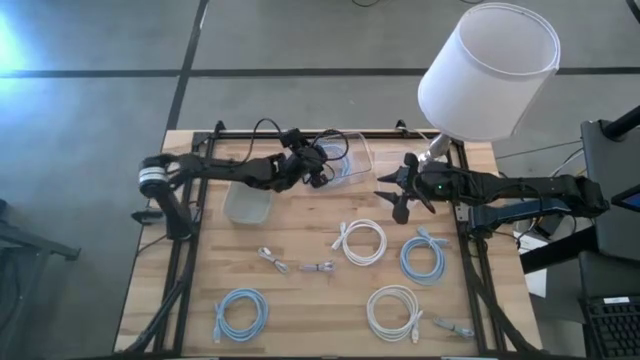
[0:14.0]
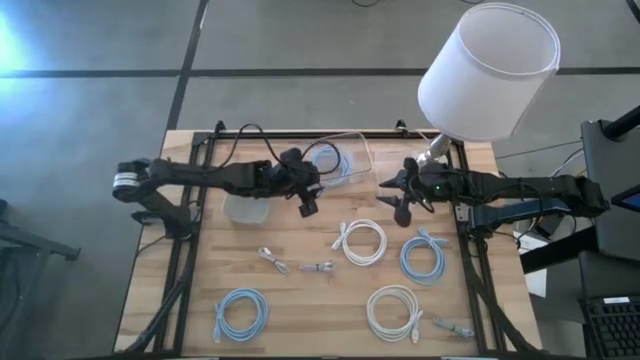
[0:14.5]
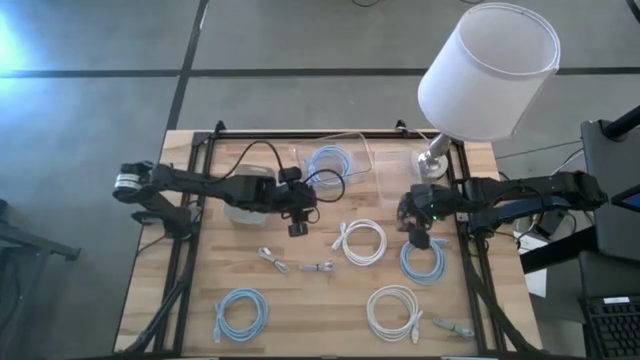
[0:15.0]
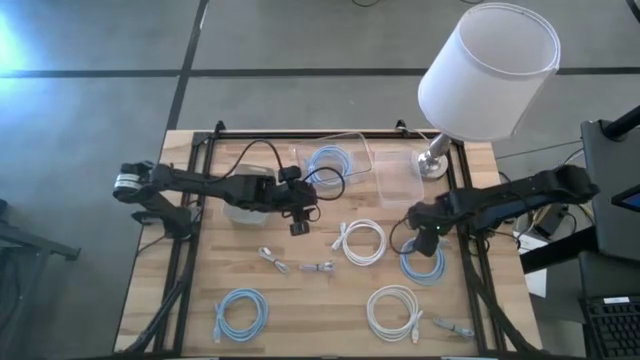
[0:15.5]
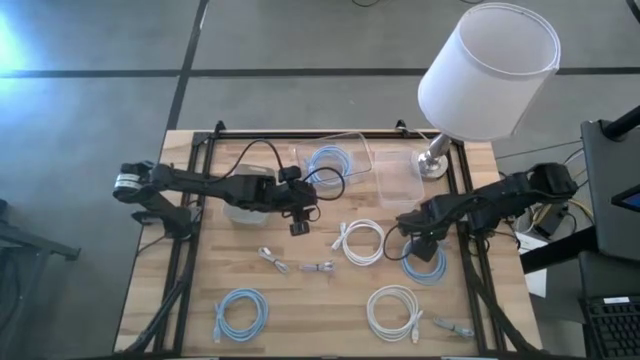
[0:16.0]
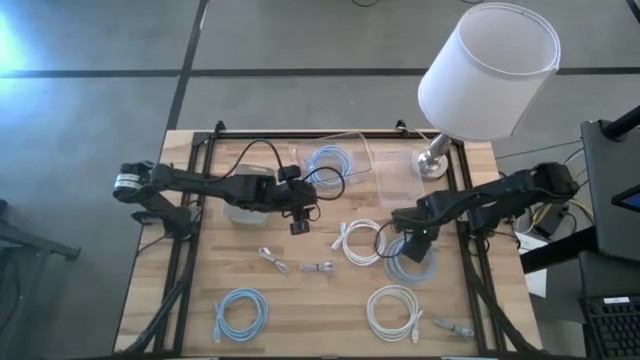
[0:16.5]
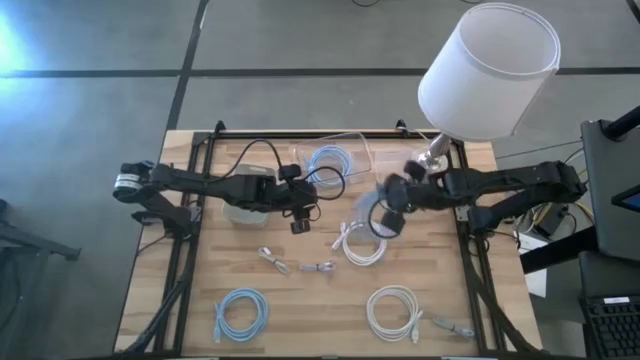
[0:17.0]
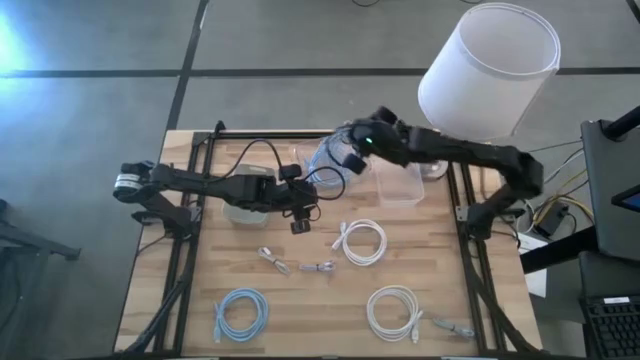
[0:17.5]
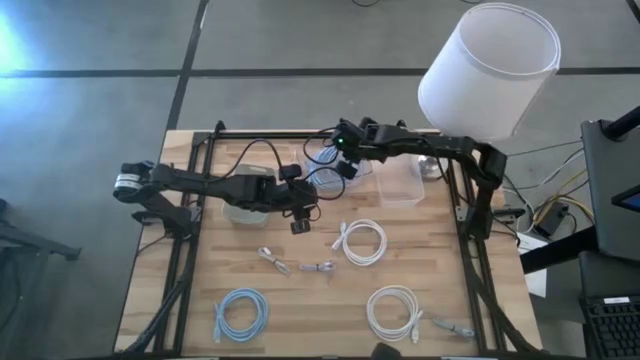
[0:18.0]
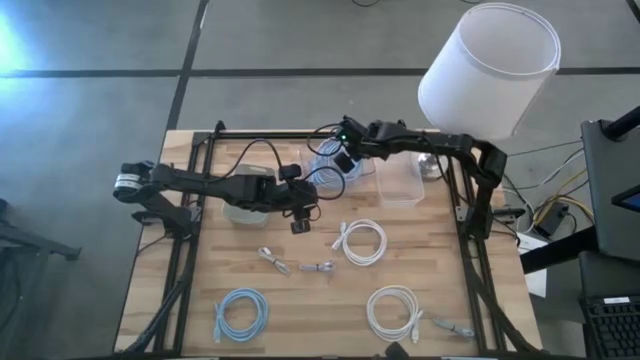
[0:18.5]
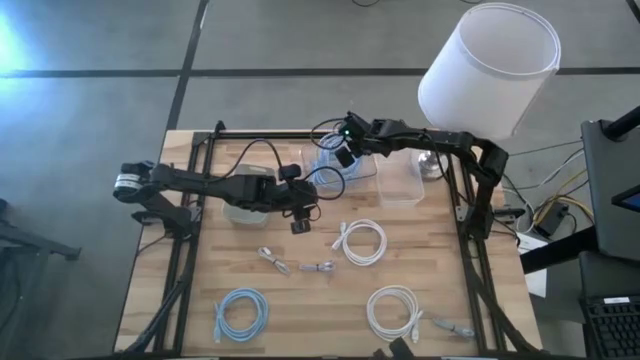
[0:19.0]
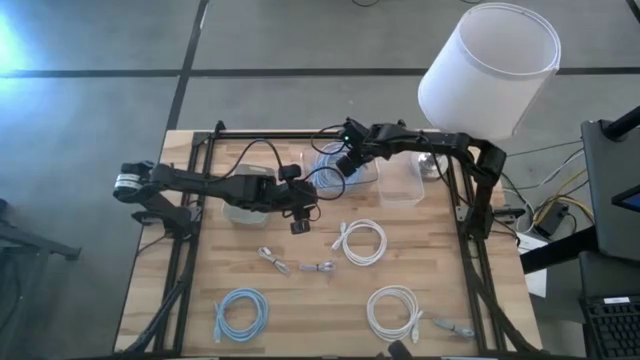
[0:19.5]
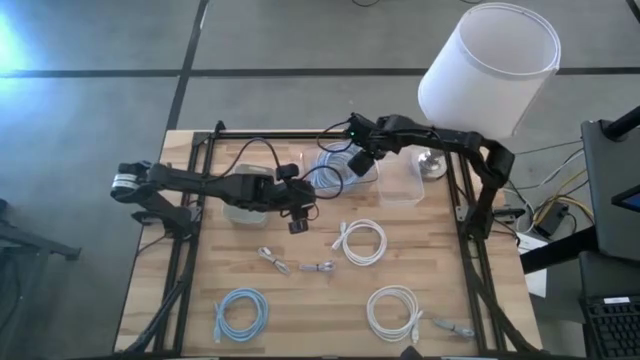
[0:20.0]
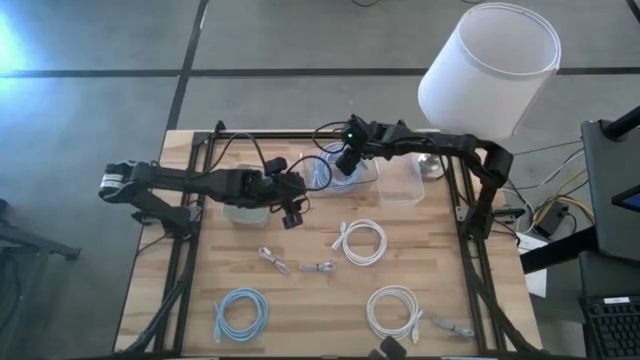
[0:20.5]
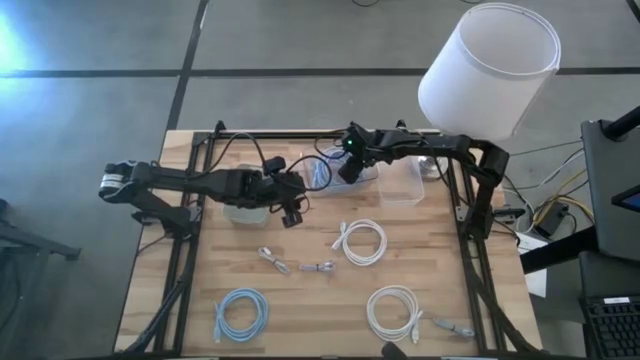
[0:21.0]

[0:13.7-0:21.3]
Task: Pick & Place USB Port
Put the right blue HDMI cable into the left transparent bin

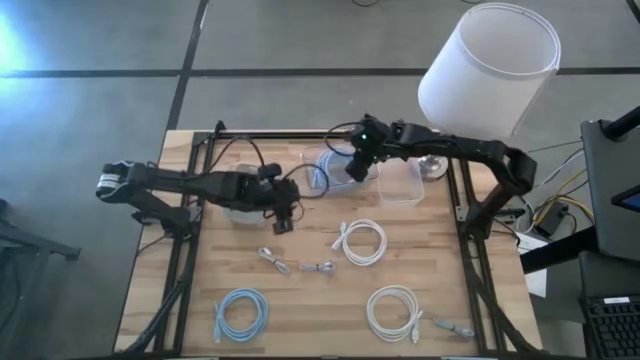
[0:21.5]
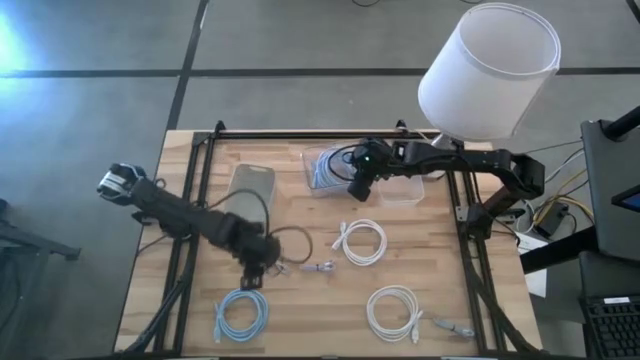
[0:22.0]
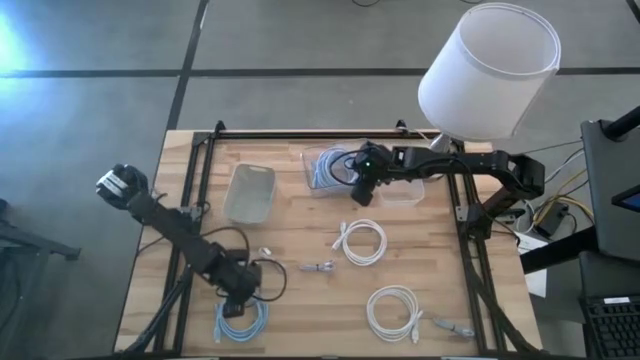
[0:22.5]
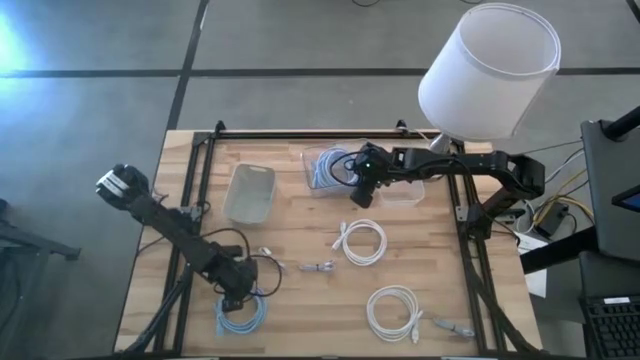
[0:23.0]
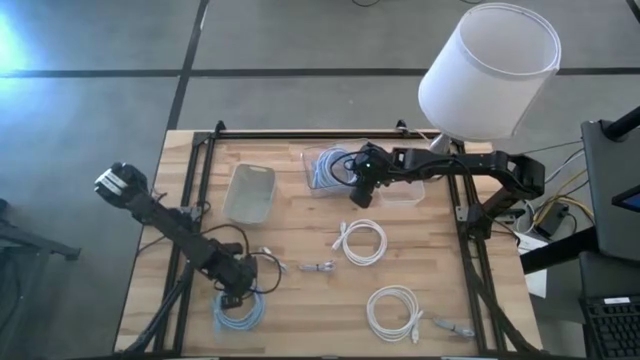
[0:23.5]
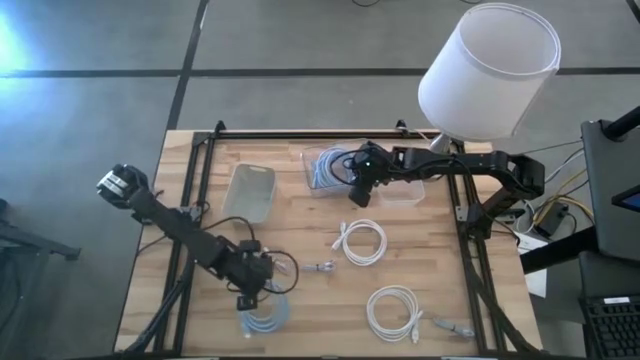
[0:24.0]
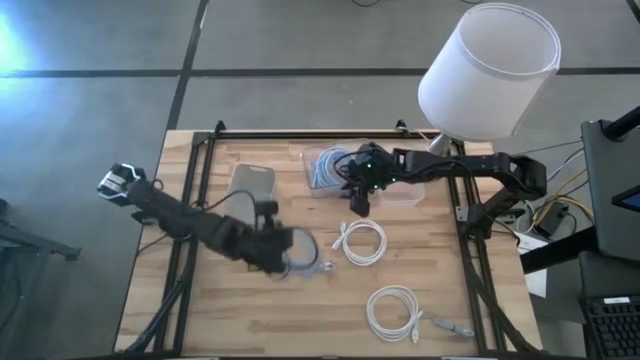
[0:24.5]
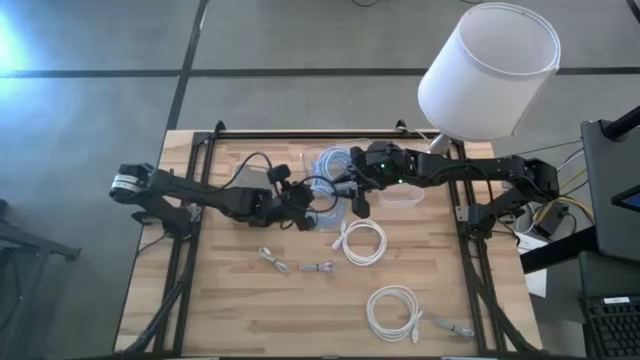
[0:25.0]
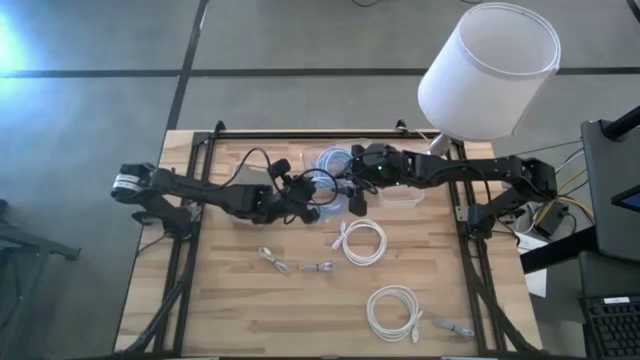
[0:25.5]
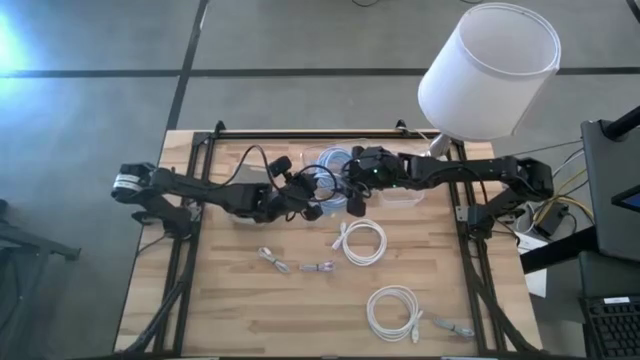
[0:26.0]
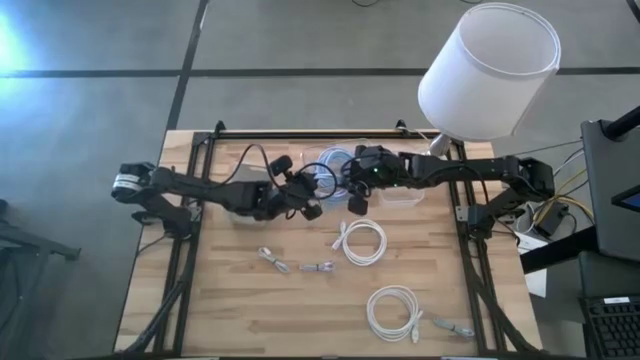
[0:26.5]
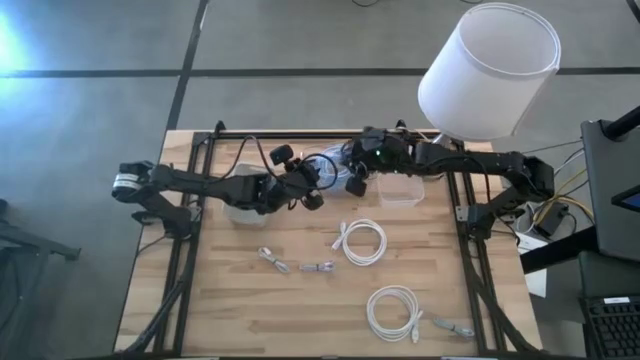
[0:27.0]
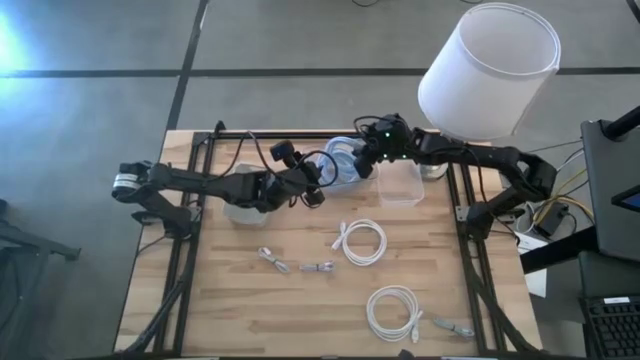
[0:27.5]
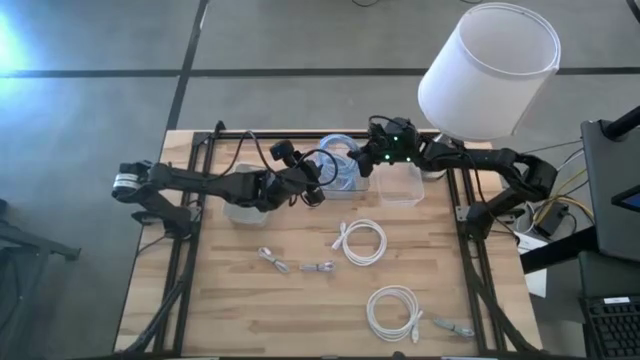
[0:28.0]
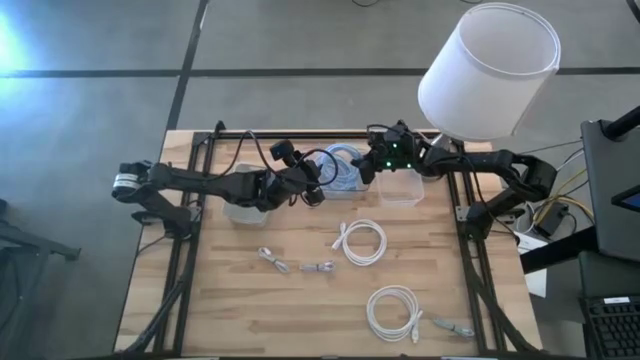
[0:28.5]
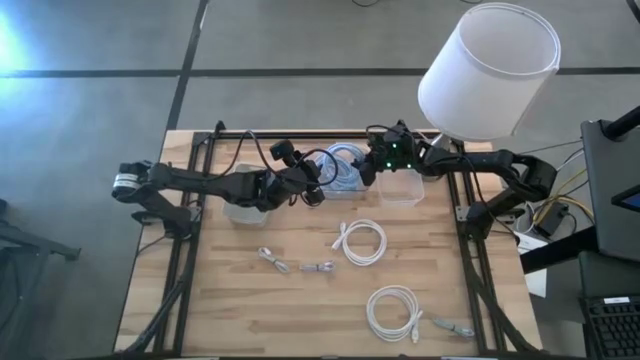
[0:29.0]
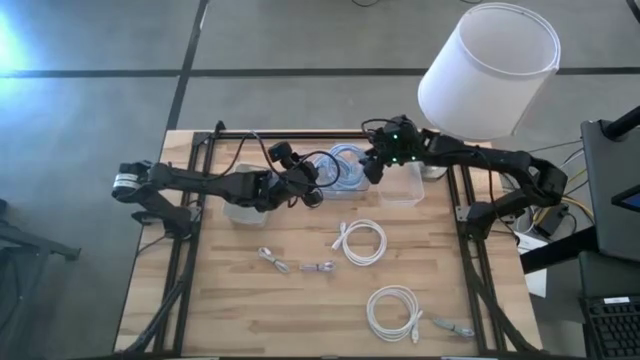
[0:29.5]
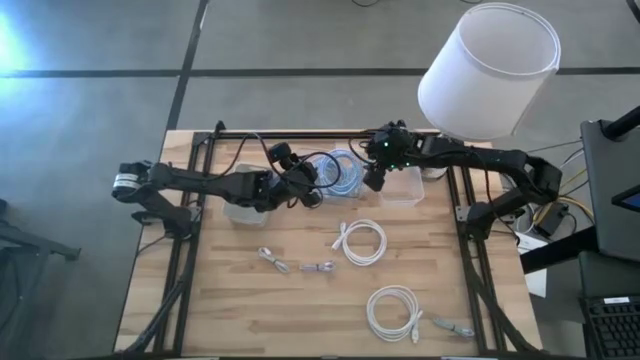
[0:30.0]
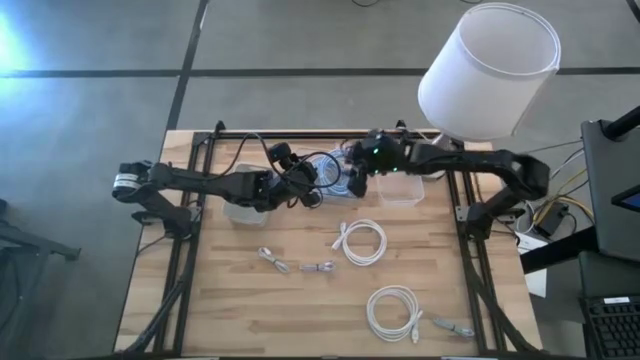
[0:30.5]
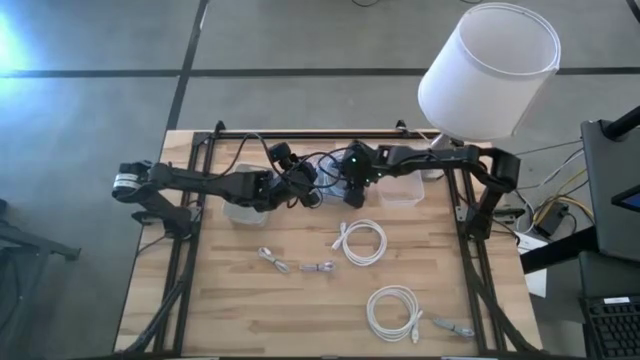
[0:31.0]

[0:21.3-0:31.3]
Put the blue HDMI cable into the left transparent bin

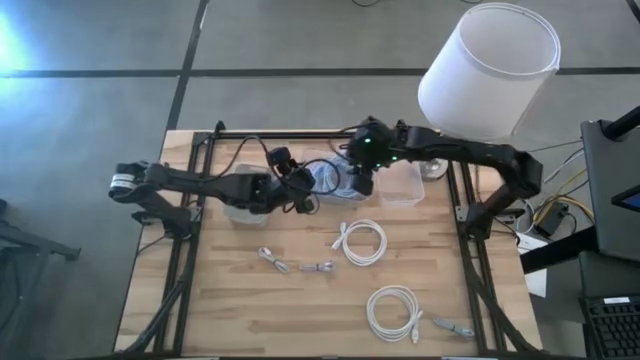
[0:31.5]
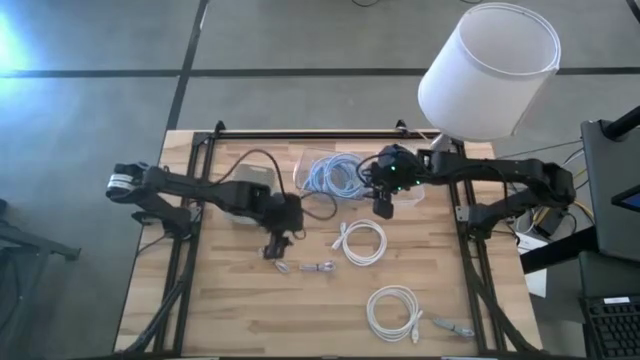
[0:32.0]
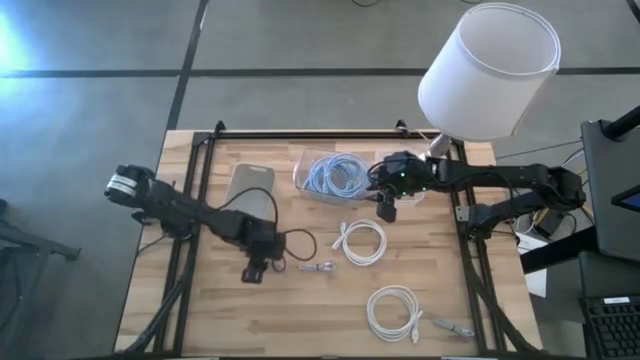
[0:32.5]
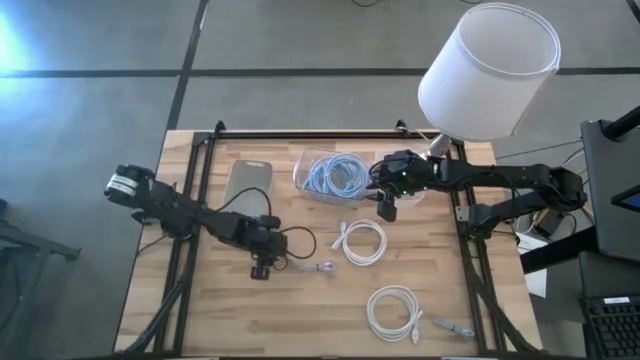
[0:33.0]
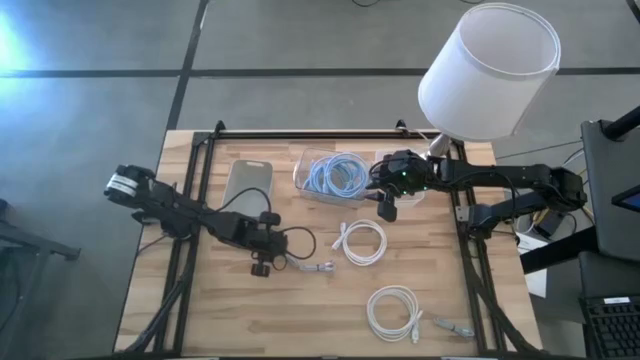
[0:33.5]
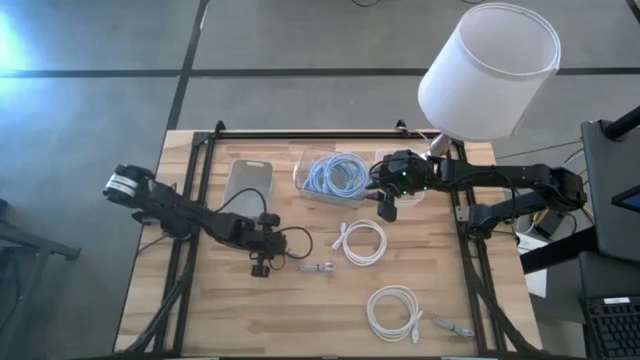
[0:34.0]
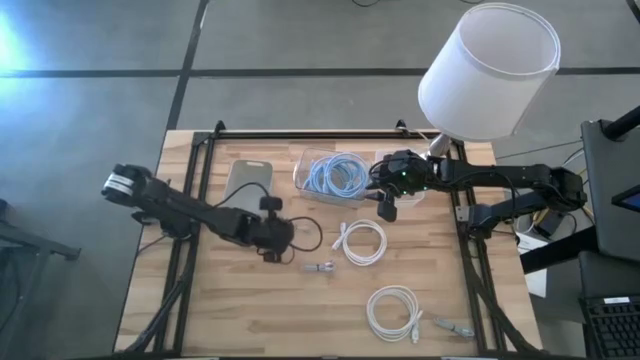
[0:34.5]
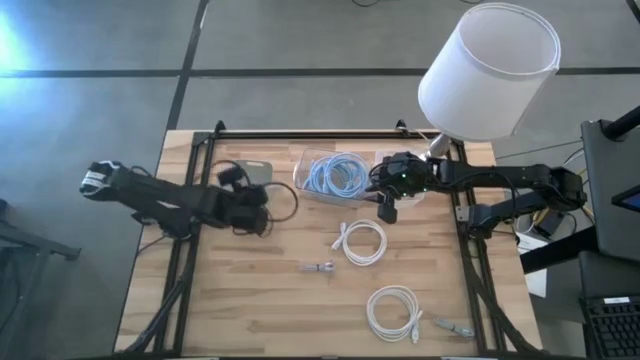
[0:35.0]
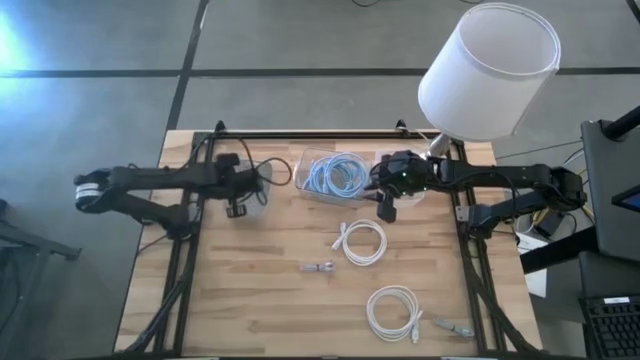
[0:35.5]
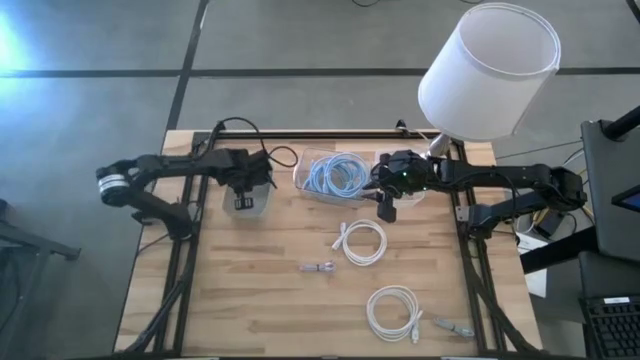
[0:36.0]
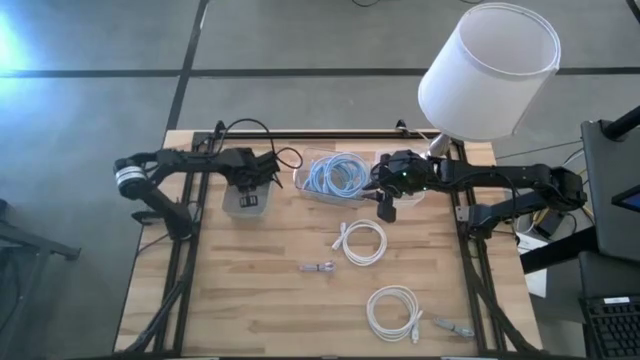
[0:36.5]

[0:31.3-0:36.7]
Put the white USB cable into the gray bin
